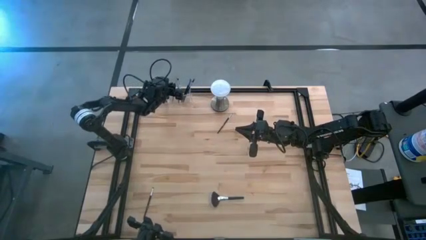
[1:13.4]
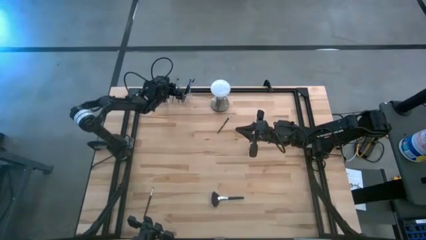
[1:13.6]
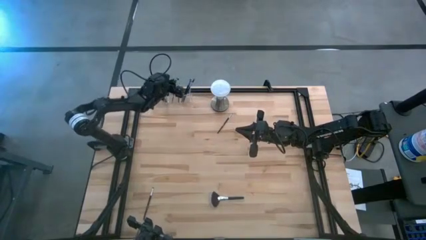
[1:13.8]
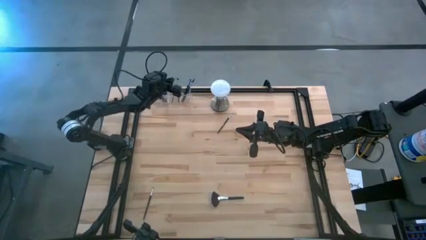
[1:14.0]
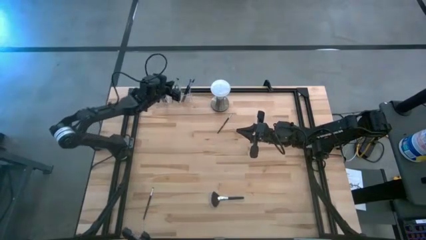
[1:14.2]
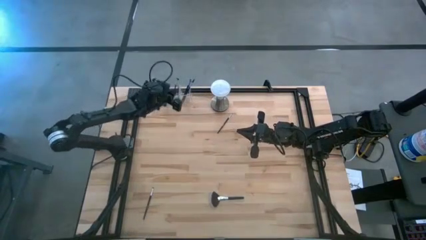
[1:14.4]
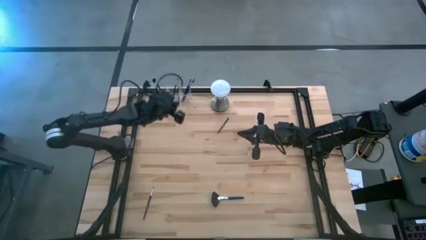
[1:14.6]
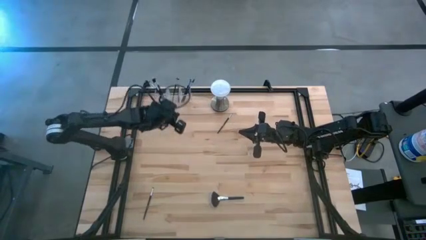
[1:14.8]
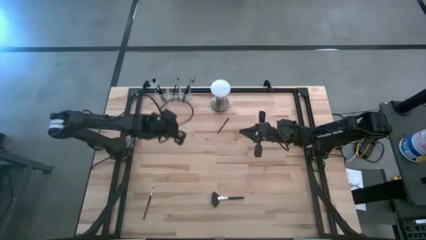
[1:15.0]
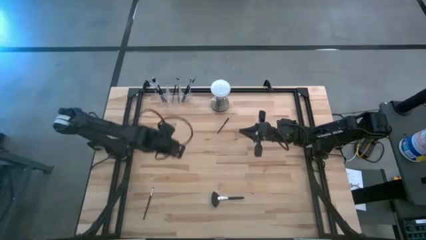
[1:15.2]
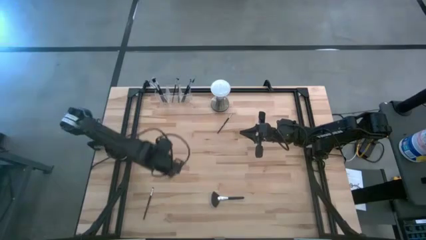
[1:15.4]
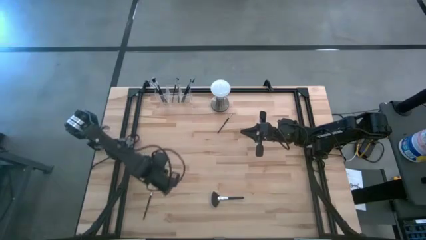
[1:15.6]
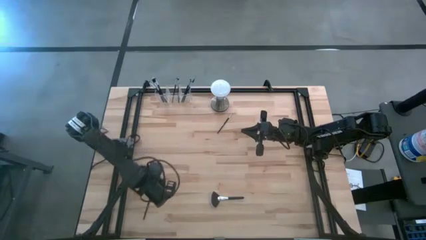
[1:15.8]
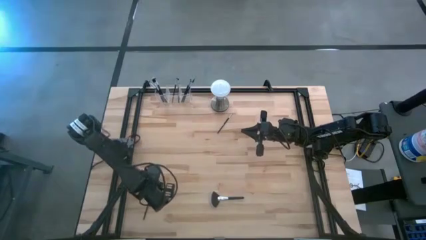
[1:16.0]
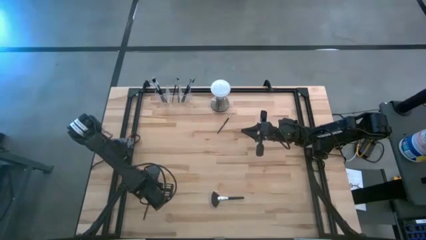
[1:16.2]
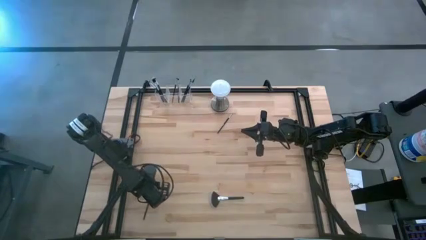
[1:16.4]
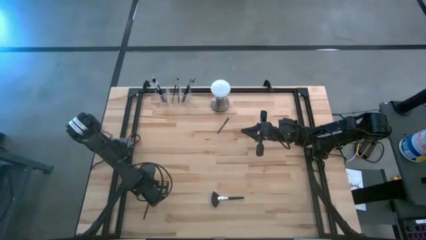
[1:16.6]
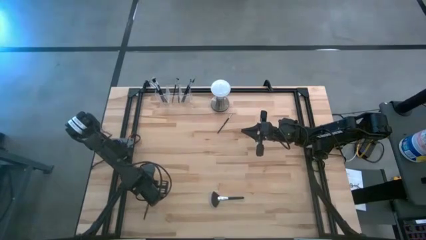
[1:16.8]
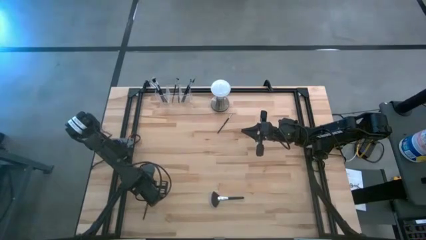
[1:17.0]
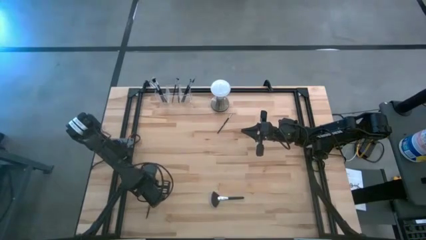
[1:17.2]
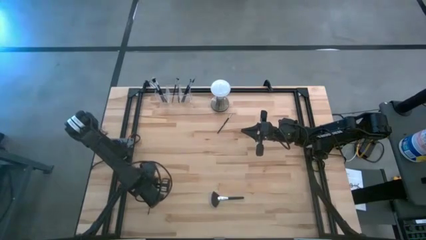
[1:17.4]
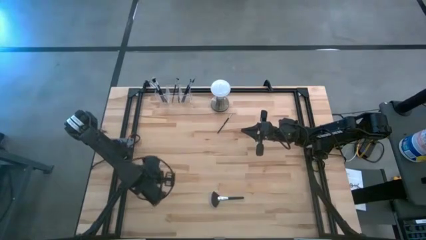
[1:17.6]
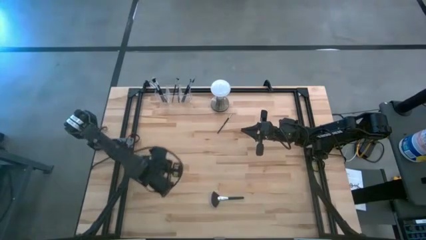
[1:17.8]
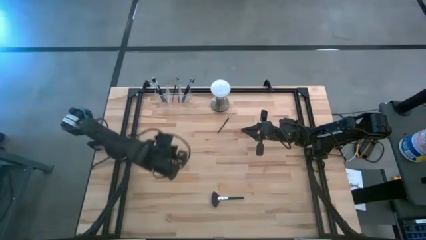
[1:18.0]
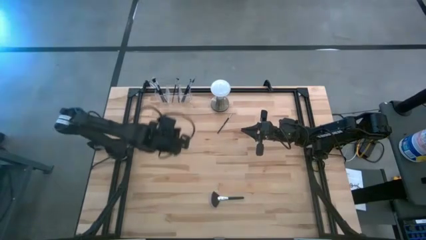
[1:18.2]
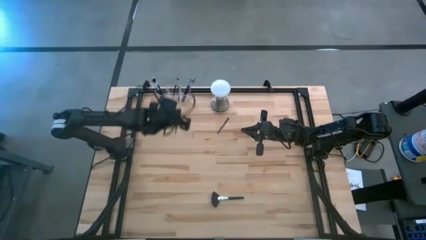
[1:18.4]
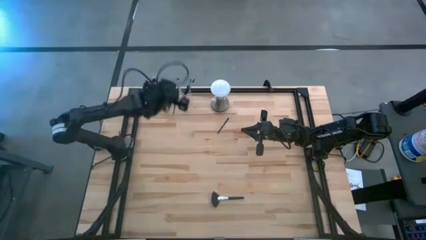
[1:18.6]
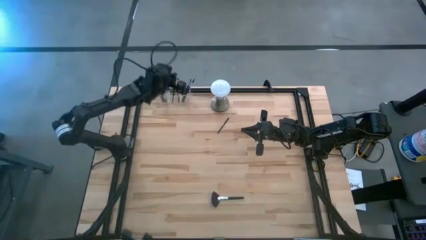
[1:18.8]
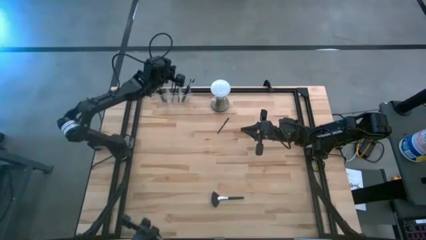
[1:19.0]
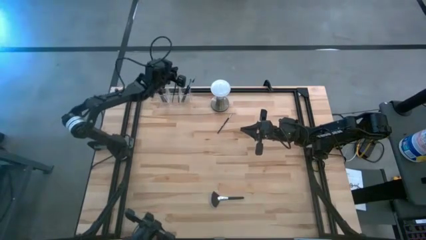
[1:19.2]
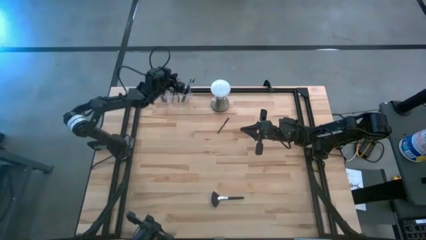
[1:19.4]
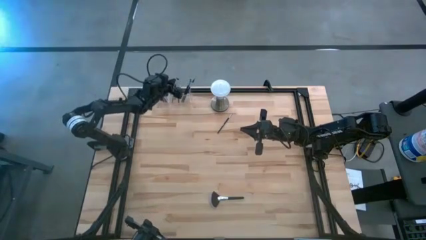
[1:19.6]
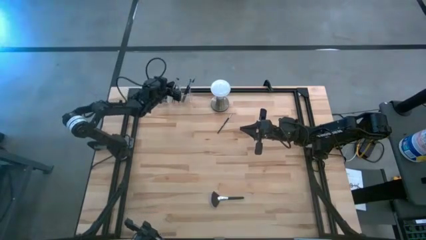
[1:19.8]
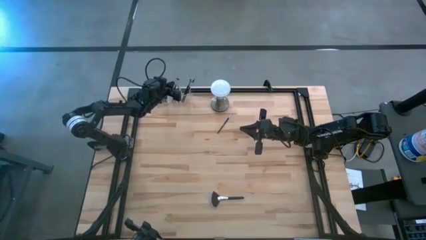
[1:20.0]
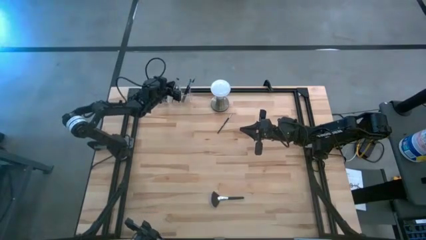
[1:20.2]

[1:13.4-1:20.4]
Task: Put items in baskets/containers
Put the eyeshadow brush into the middle section of the transparent organizer

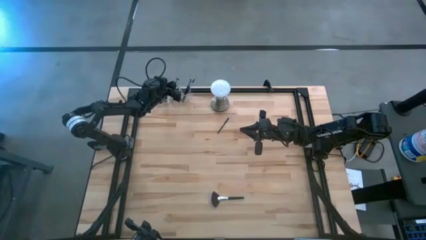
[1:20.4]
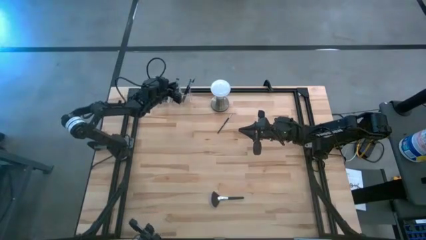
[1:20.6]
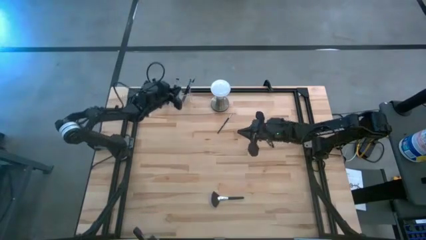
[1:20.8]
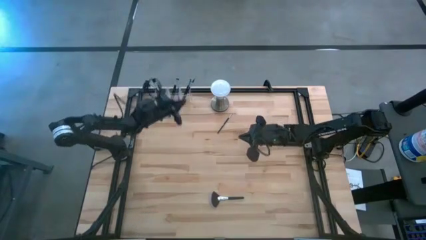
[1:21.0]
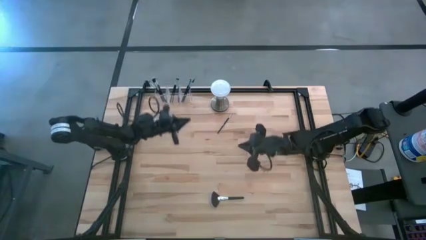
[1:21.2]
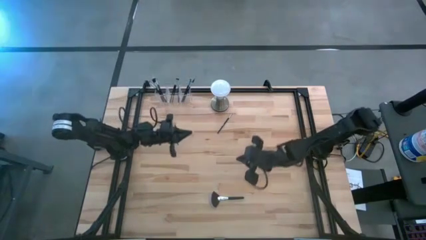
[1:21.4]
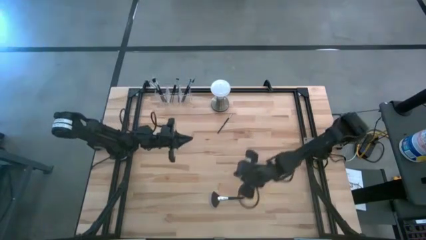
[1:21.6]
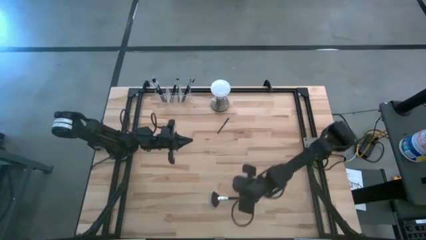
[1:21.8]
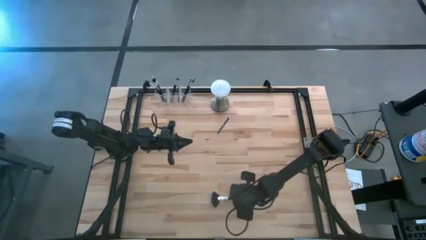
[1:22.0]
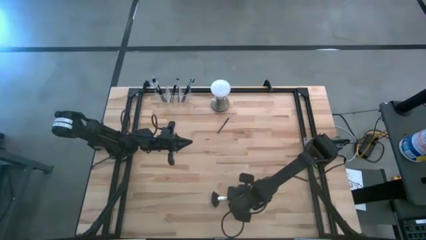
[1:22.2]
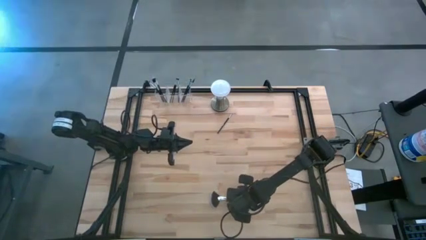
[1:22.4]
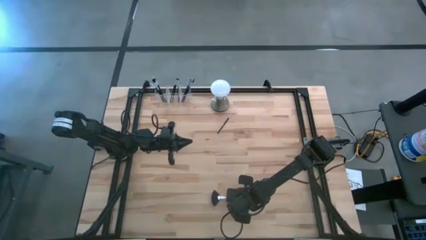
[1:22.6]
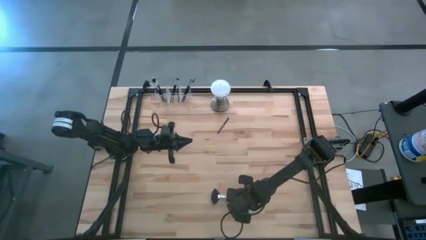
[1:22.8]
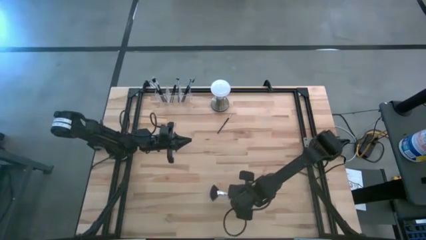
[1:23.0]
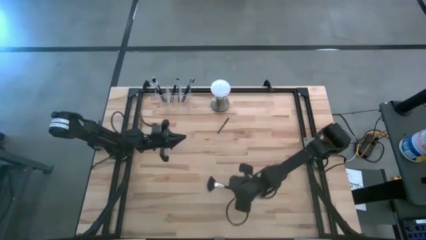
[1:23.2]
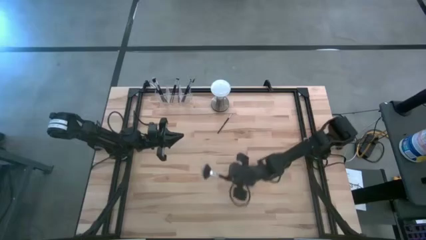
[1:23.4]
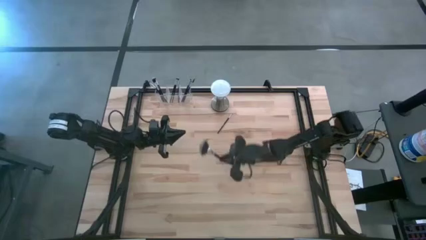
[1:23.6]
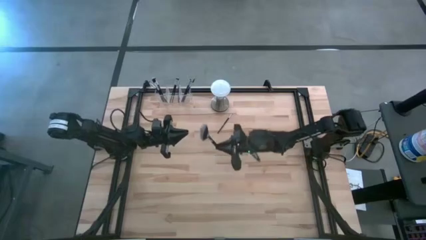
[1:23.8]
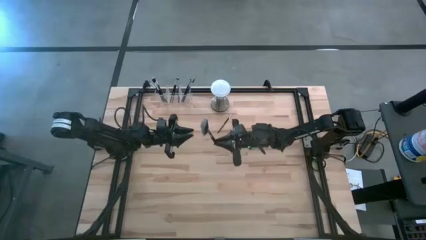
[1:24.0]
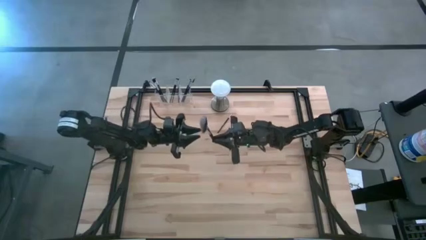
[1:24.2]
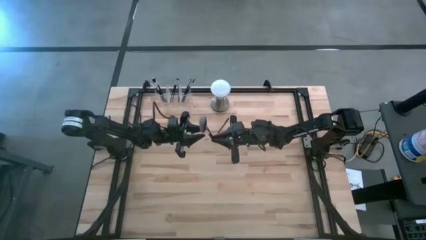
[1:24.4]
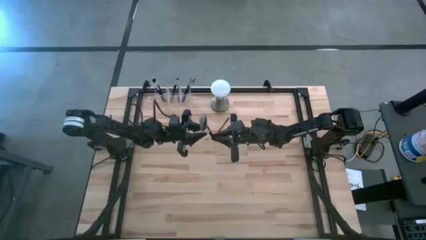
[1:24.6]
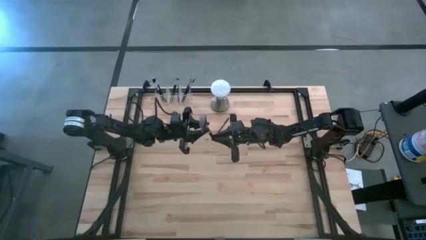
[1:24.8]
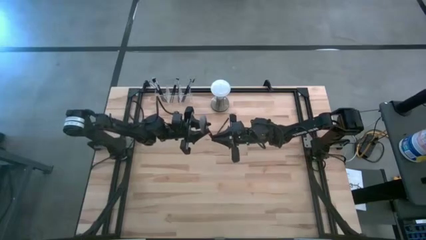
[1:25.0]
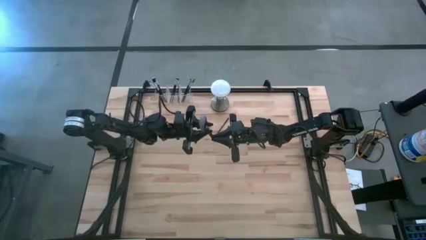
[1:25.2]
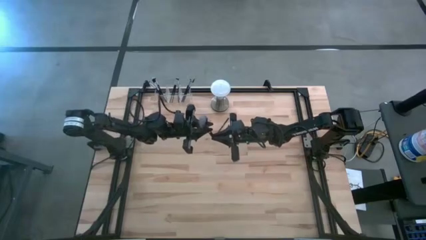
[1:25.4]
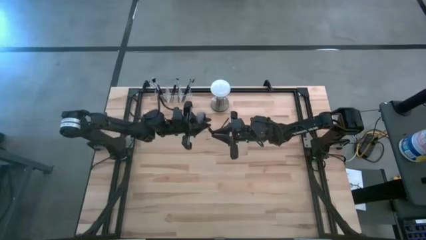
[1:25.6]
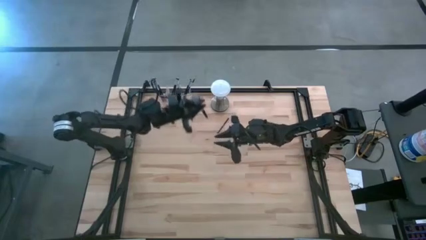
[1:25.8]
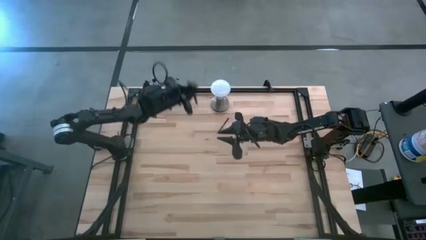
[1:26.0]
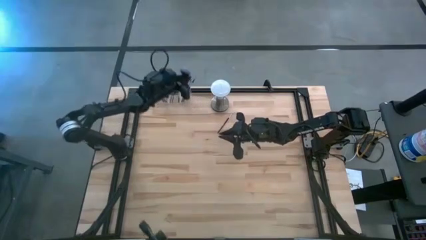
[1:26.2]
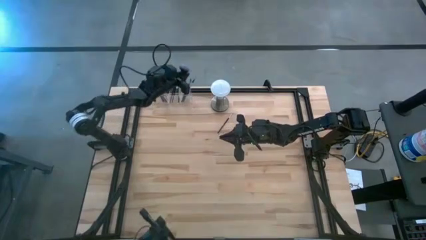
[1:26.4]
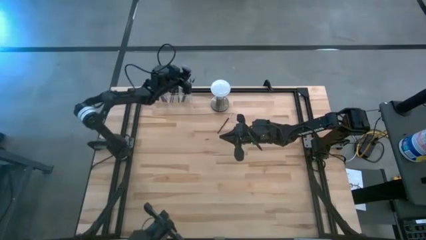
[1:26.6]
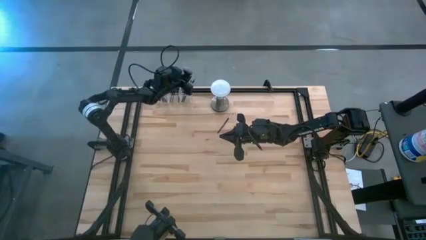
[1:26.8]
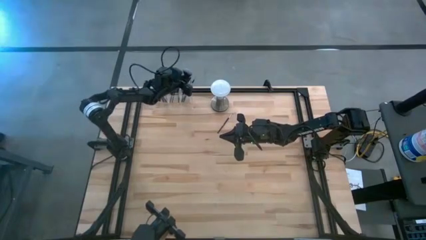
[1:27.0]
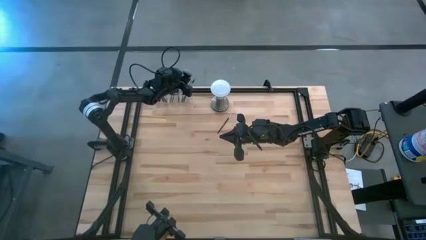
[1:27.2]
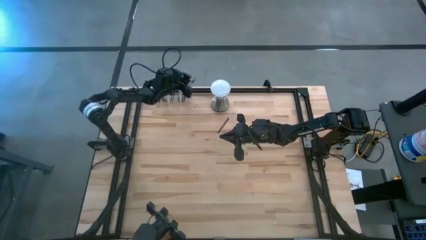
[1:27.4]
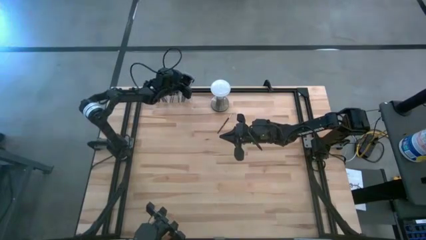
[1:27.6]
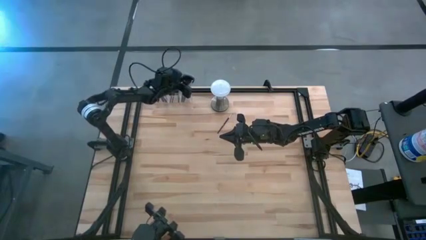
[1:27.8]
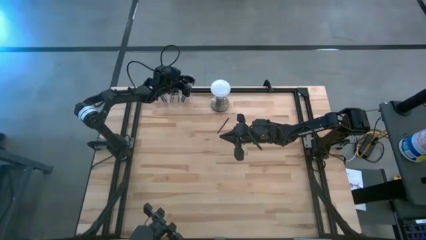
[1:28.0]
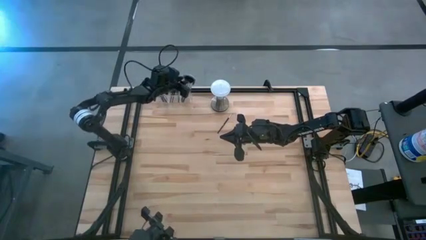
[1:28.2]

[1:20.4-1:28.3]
Put the highlighter brush into the right section of the transparent organizer

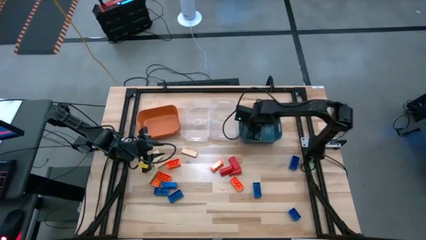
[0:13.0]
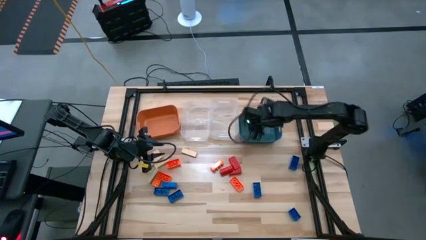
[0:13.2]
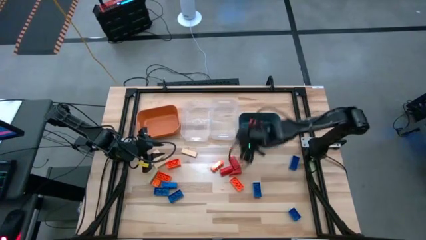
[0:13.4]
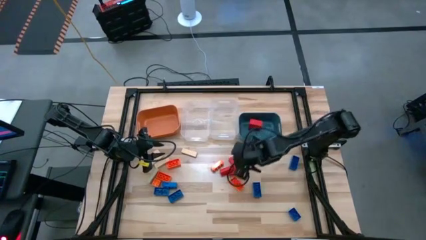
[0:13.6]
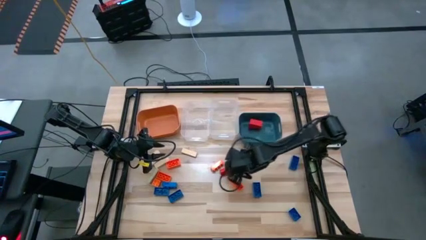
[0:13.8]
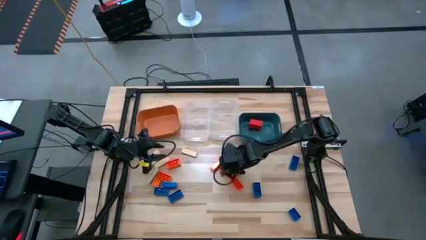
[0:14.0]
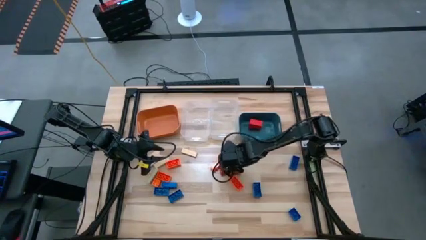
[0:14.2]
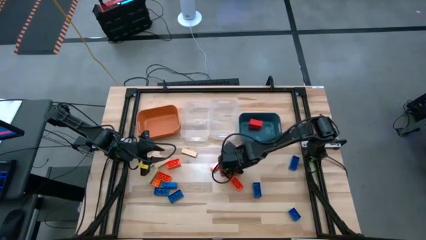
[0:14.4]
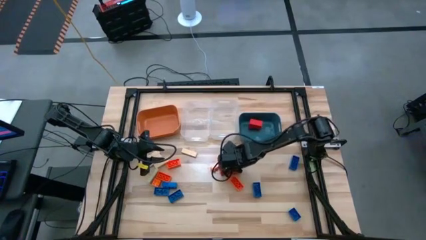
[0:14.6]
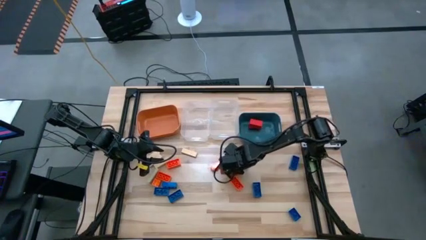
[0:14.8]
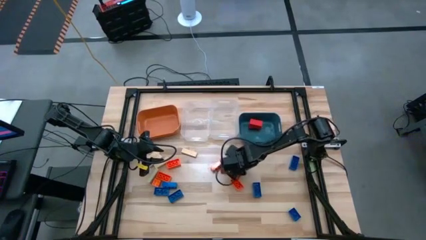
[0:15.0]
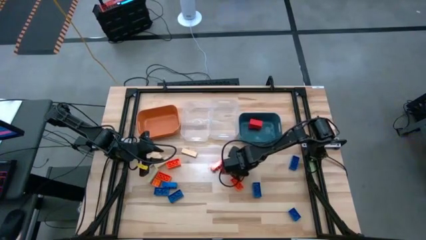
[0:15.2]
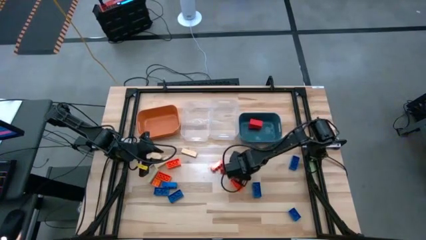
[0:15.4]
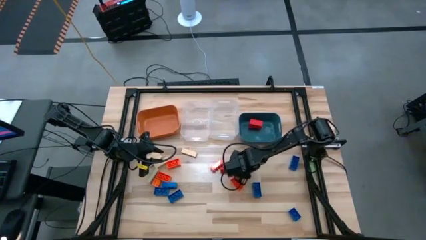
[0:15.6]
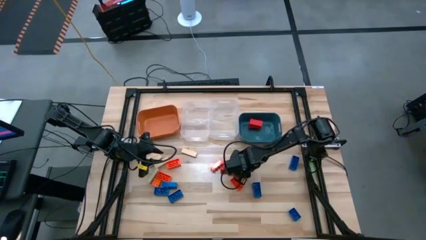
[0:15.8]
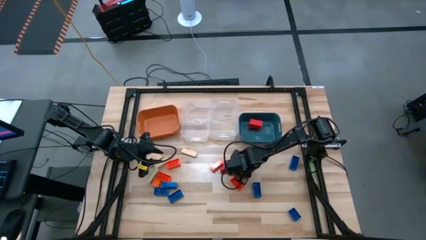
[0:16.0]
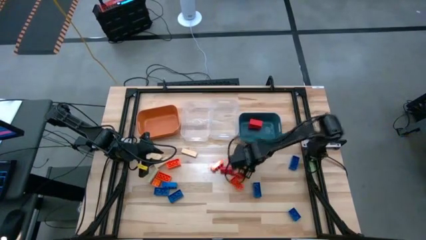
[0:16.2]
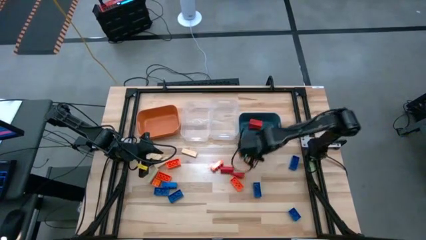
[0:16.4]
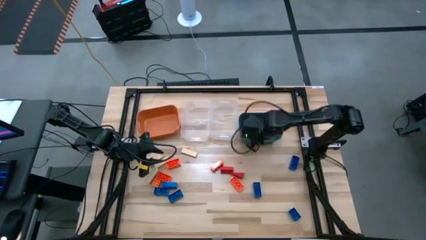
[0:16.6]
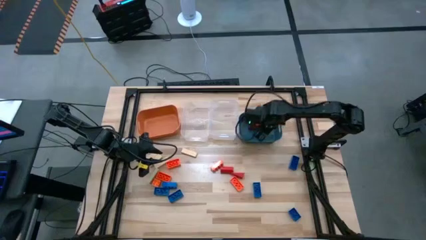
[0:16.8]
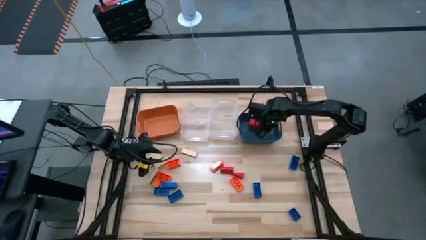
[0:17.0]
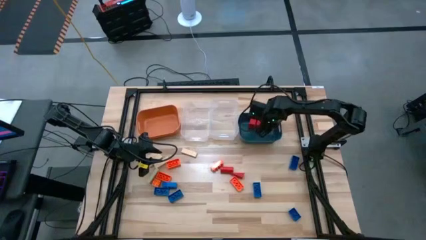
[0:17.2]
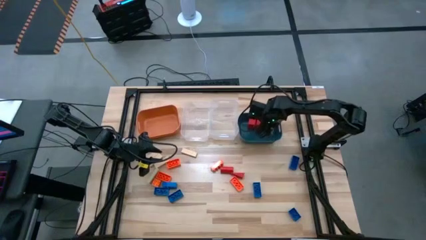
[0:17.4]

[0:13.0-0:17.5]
Task: Sort blocks
Put the red block into the blue bin
